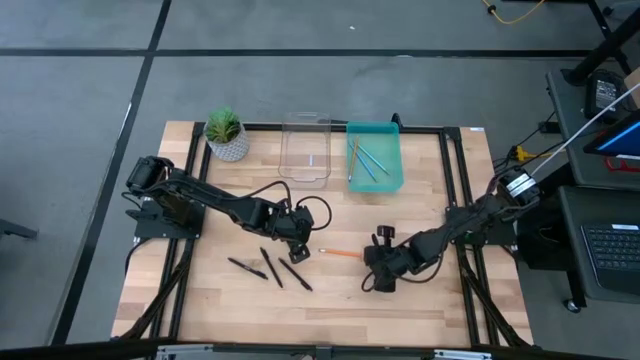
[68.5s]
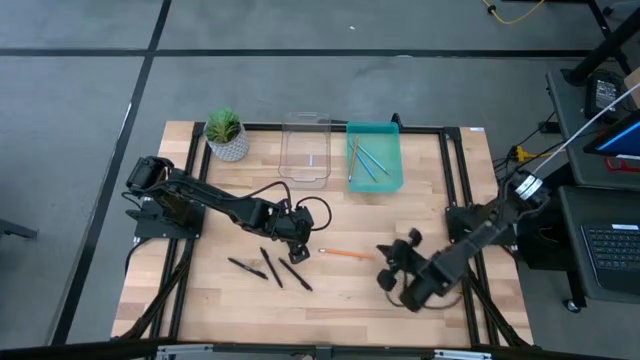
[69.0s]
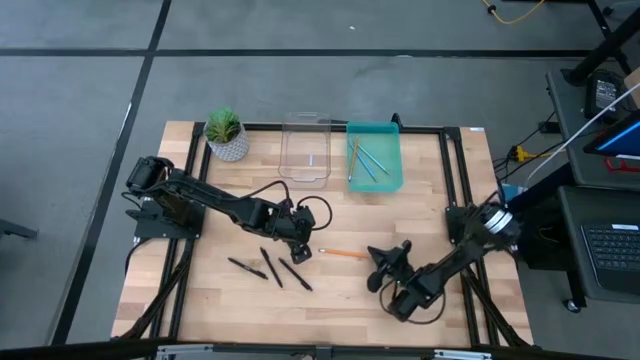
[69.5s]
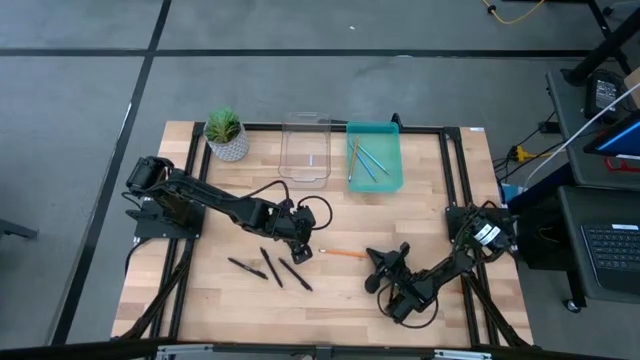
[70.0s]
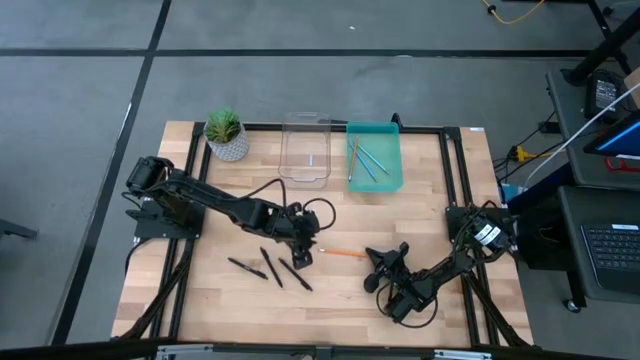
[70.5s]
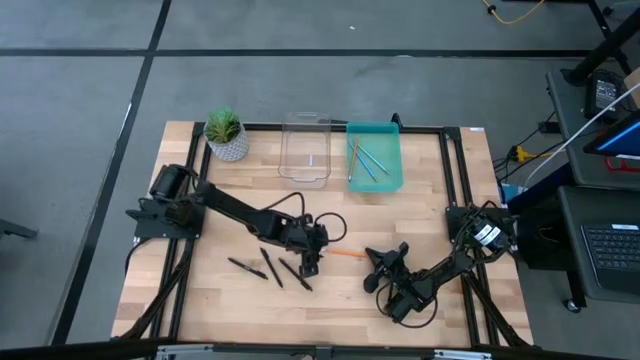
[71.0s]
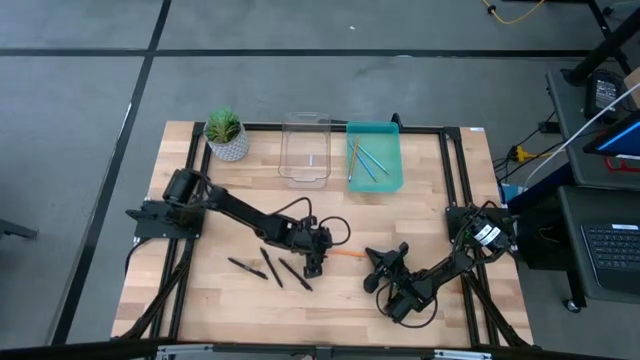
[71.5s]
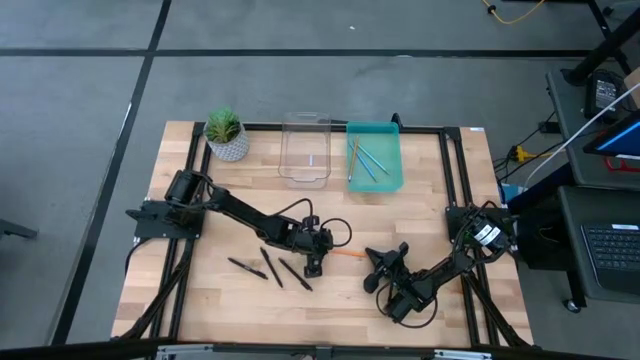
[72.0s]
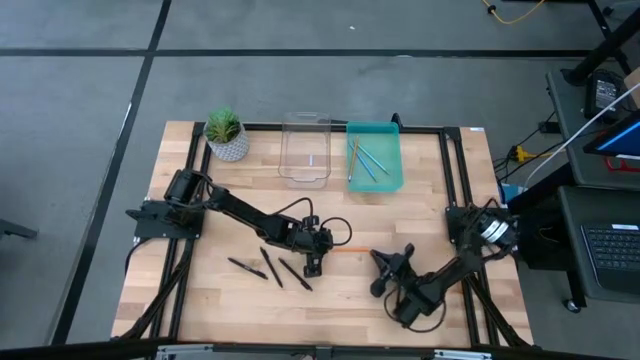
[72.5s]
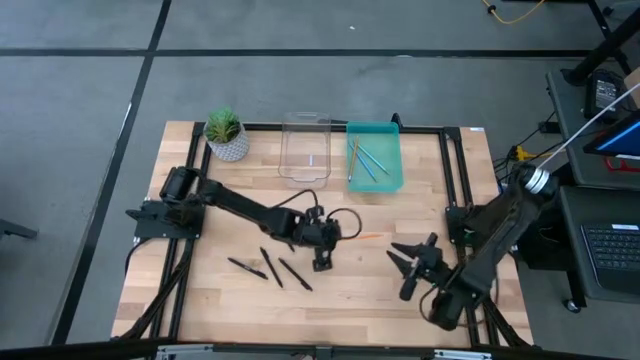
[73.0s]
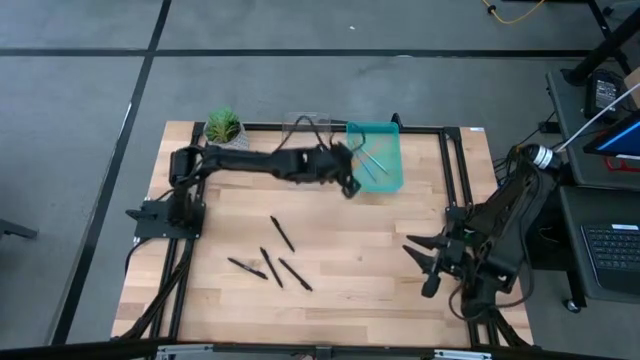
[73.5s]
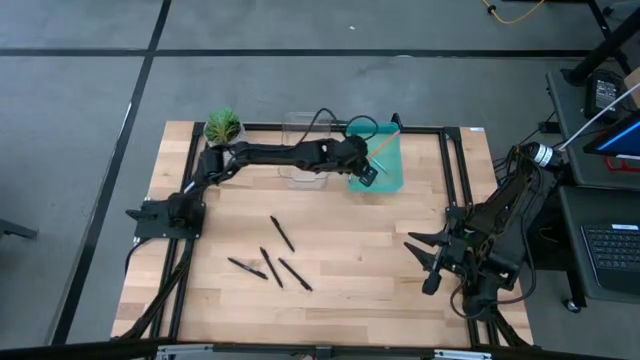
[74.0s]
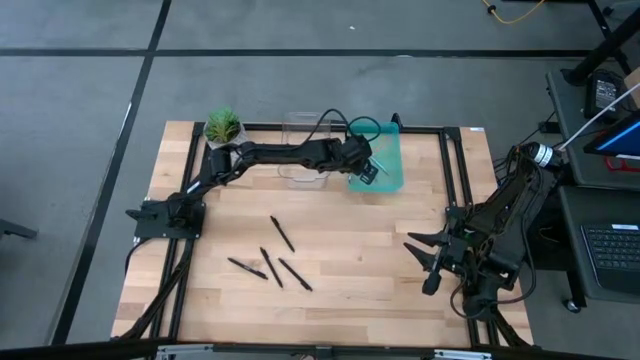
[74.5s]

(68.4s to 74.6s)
Task: Sort pens & pencils
Put the orange pencil into the blue bin

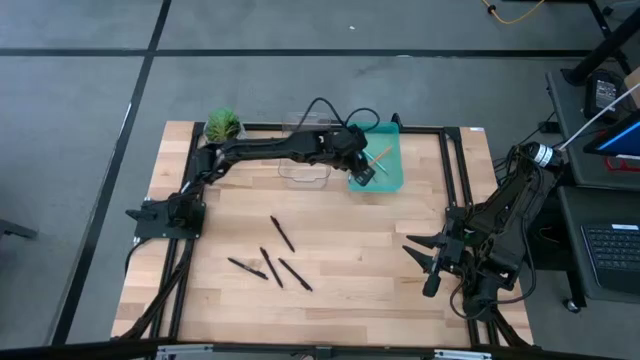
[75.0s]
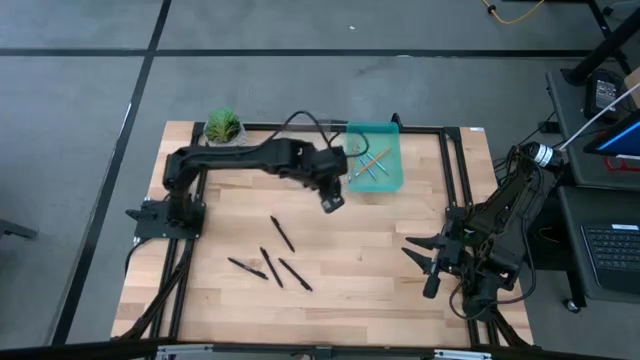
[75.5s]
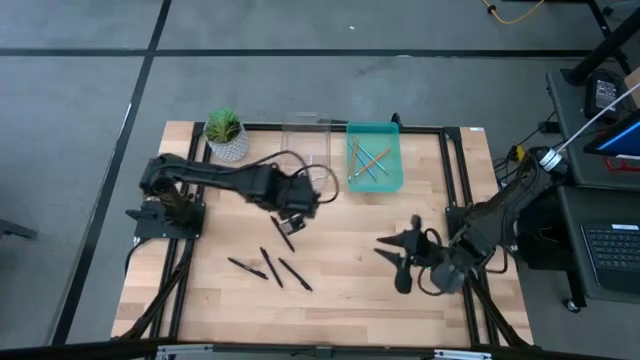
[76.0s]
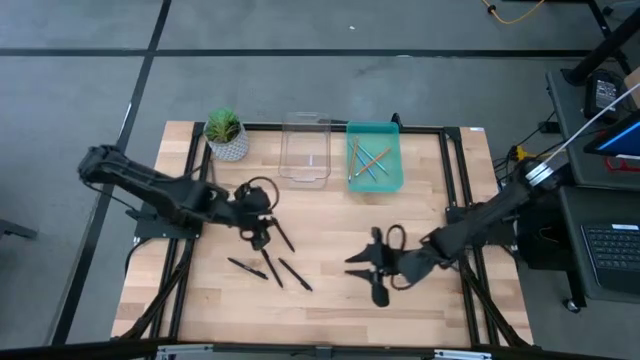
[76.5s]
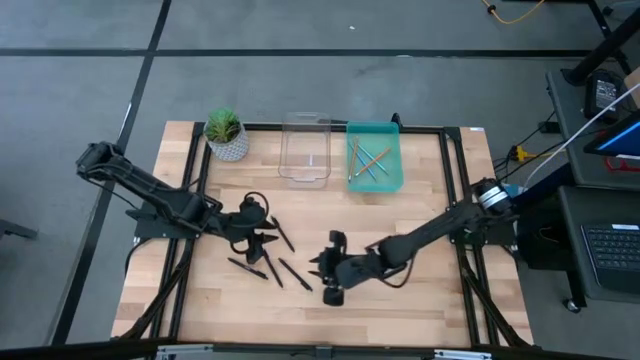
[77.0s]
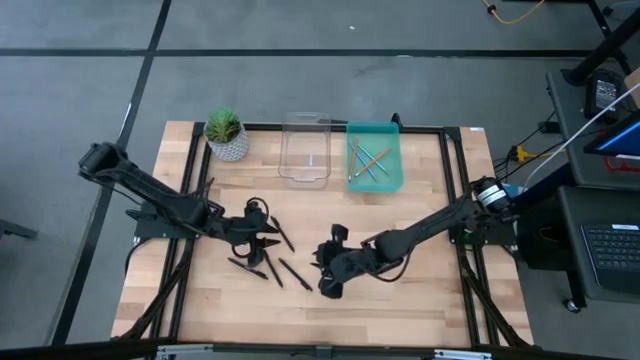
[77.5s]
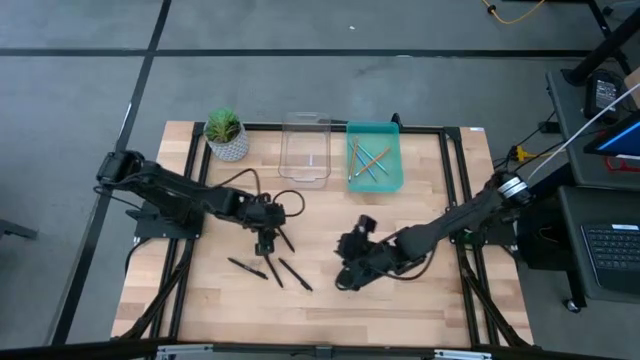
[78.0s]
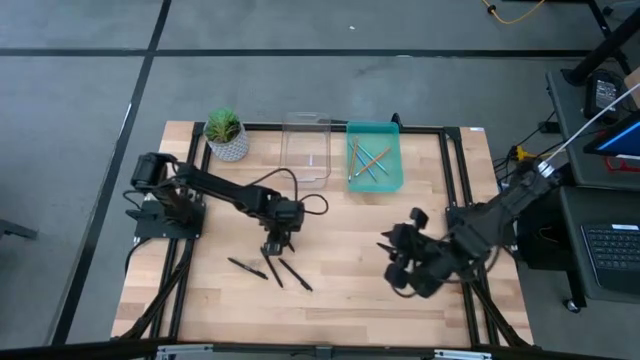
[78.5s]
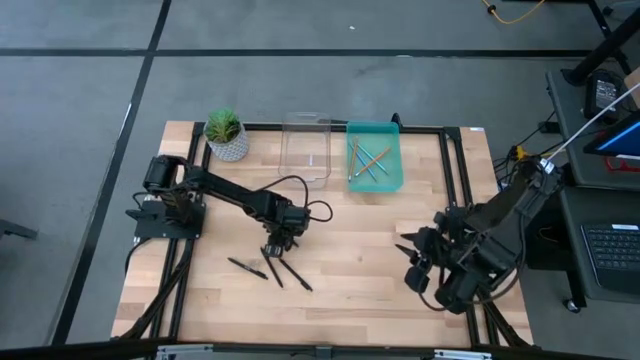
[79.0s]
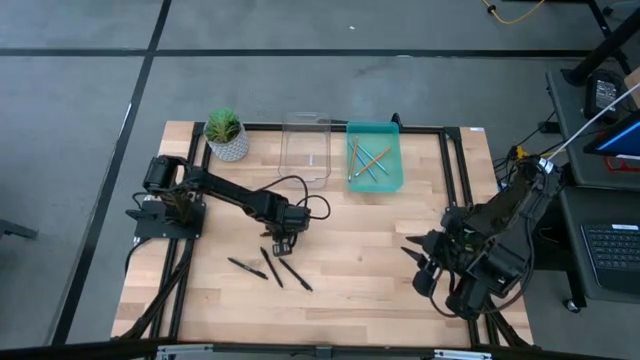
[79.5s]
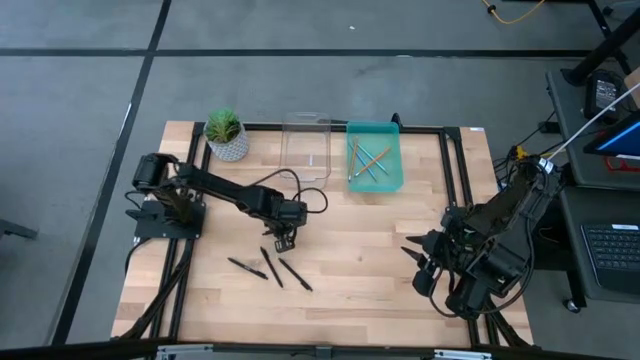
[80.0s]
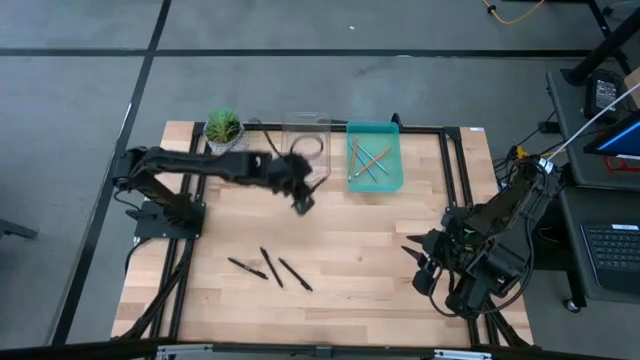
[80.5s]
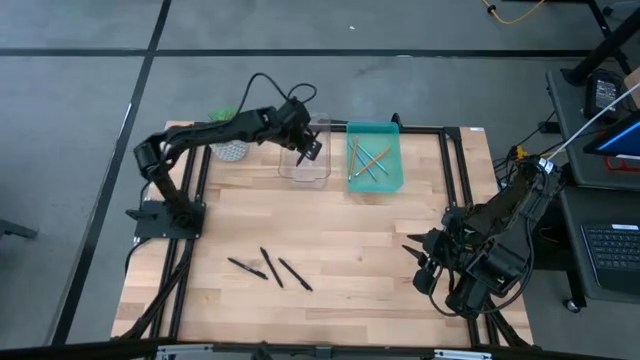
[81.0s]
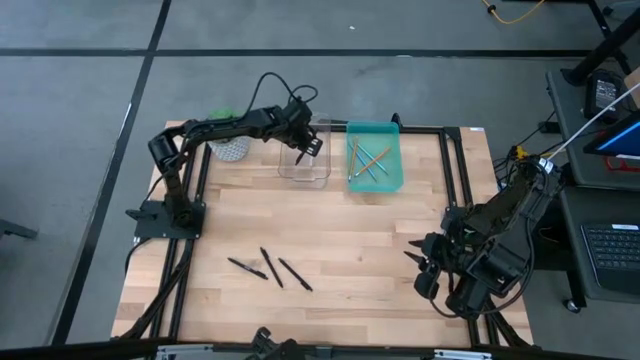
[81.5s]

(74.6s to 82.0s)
Put the black pen into the transparent bin

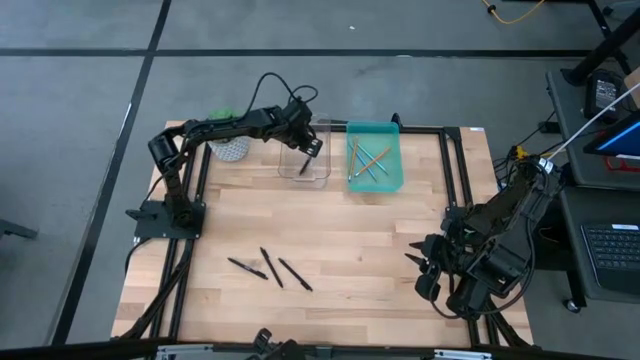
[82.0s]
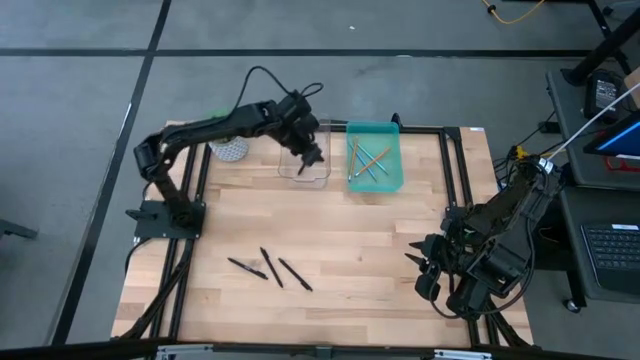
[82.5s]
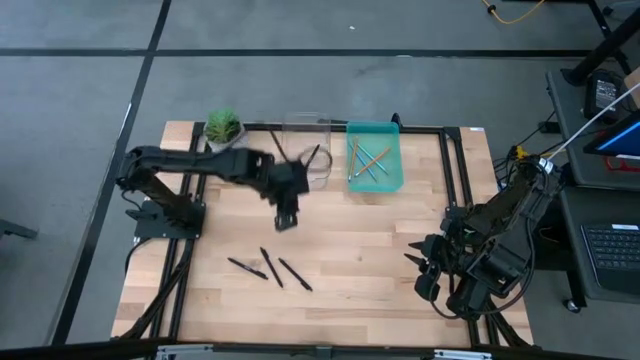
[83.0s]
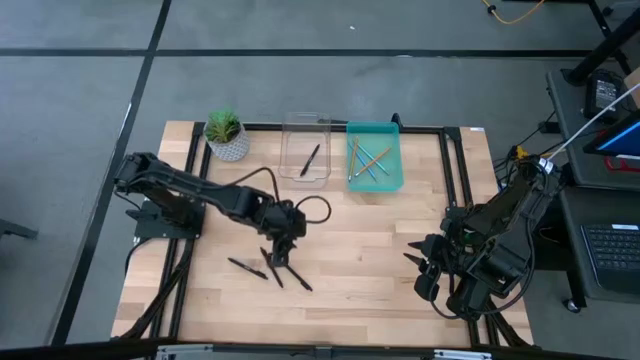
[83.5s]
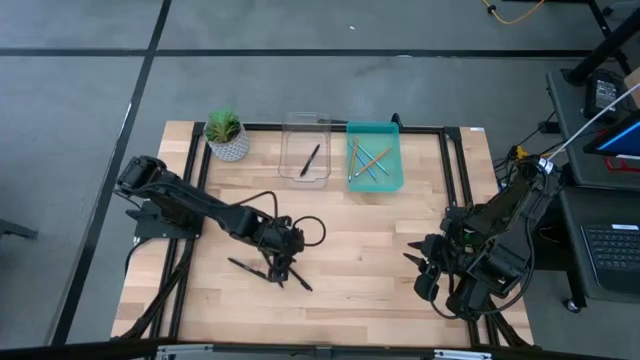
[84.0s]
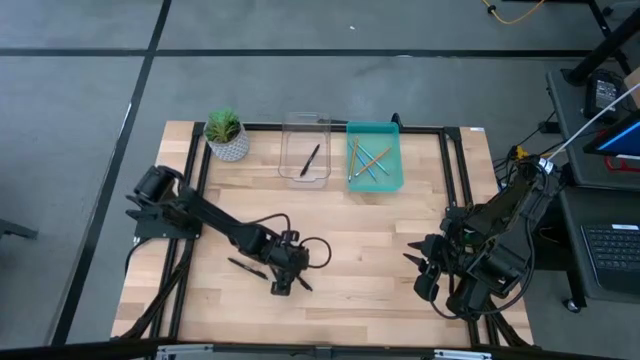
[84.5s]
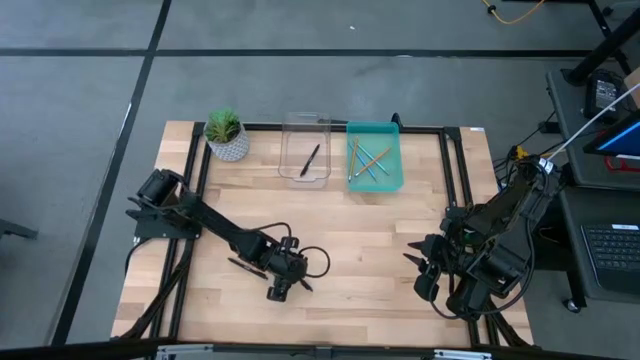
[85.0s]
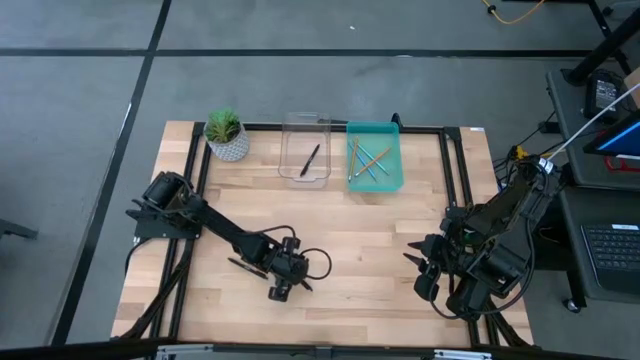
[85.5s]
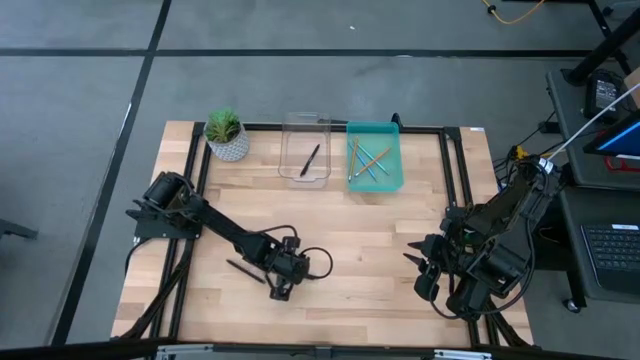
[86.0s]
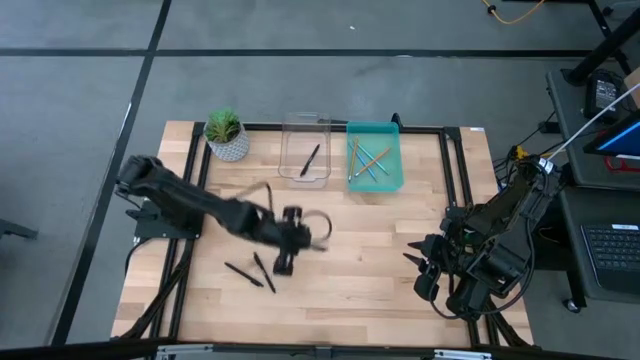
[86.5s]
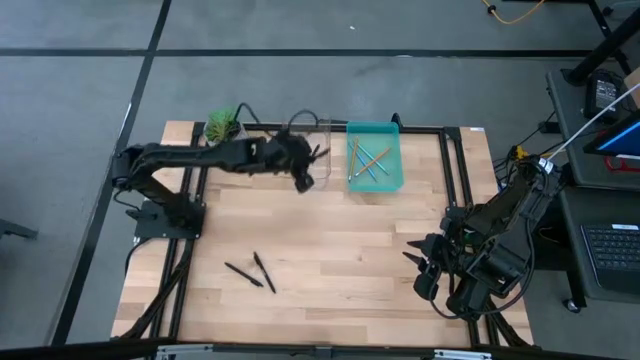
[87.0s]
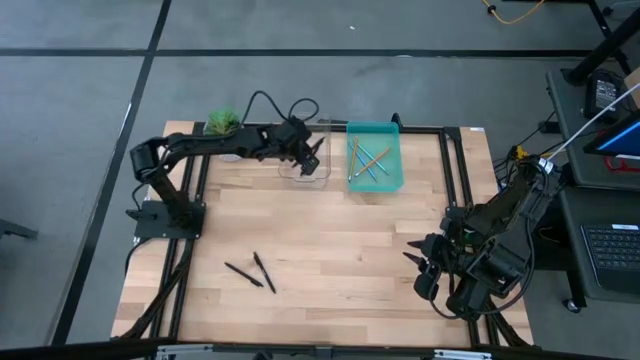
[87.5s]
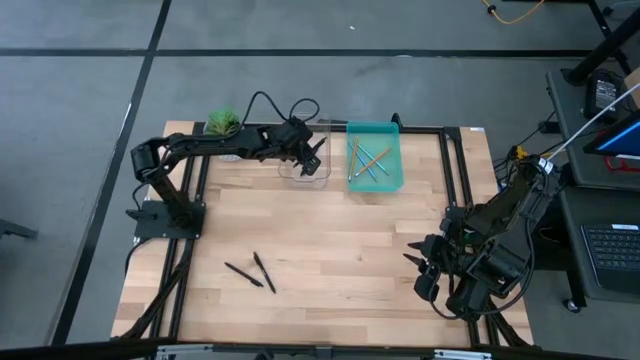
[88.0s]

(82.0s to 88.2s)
Put the right black pen into the transparent bin

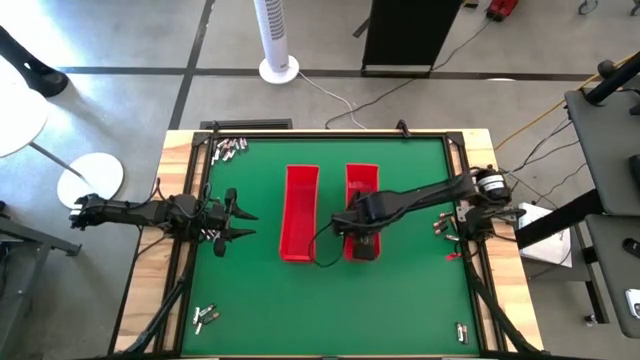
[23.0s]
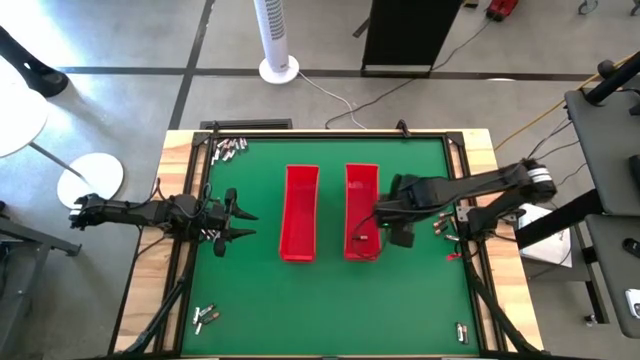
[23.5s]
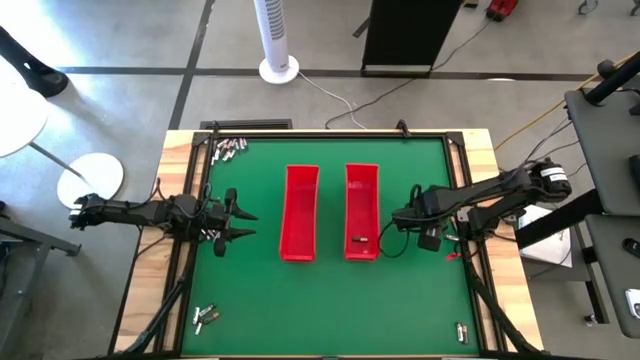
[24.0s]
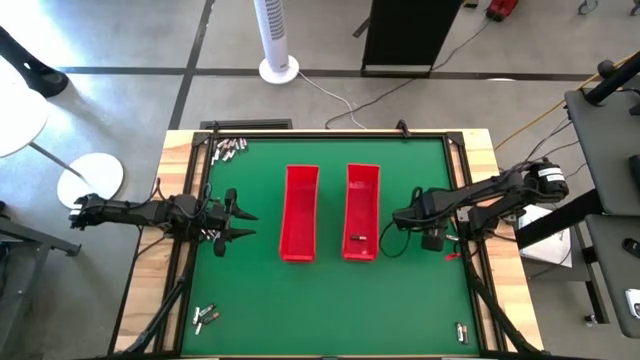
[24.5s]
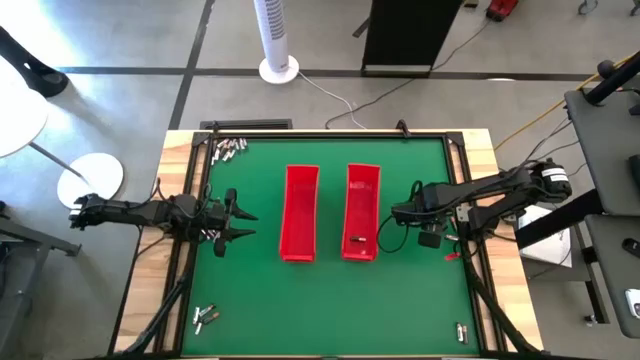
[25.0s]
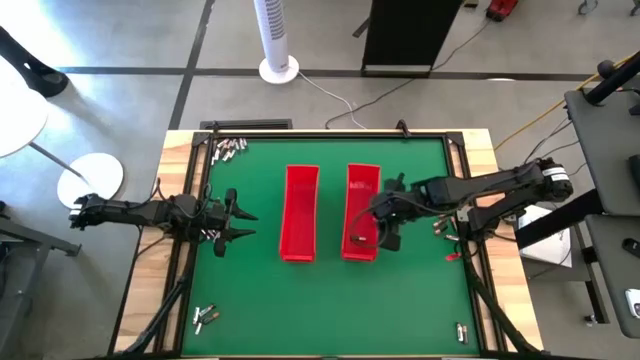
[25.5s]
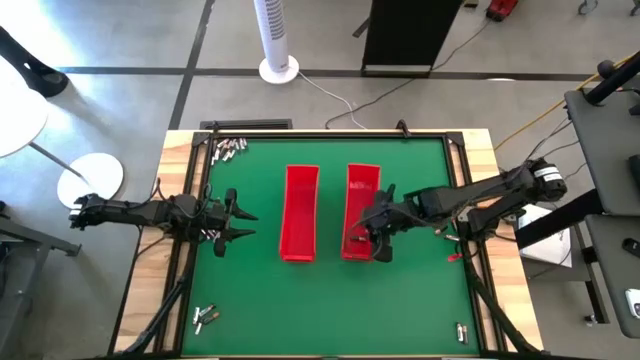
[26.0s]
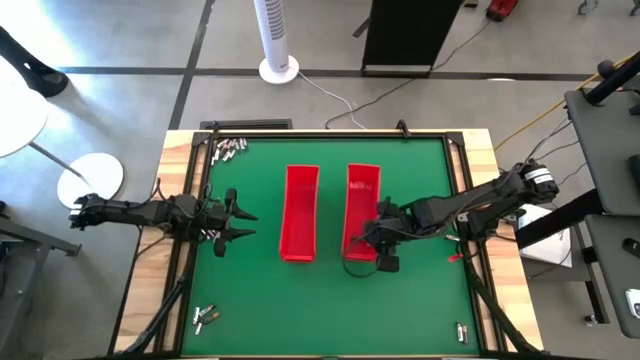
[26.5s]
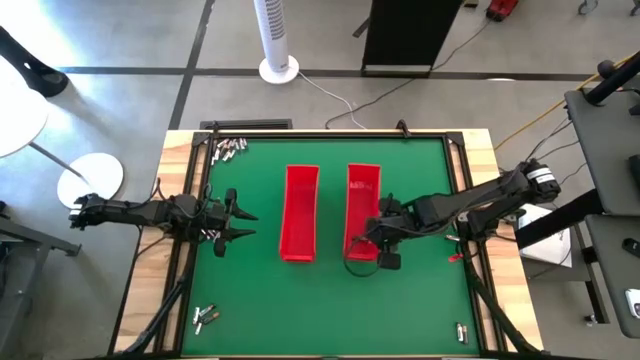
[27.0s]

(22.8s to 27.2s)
Task: Sort batteries
Adjust the right red bin
